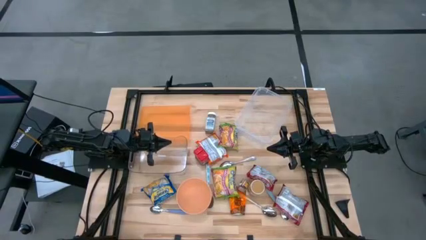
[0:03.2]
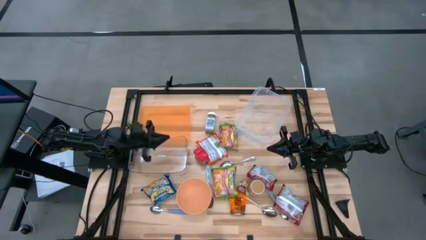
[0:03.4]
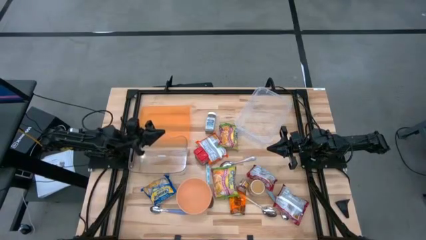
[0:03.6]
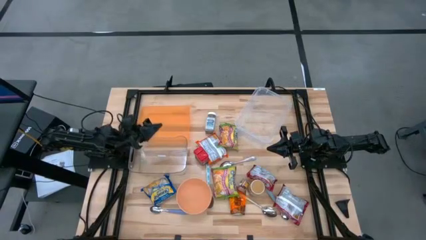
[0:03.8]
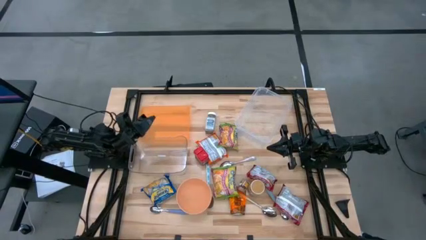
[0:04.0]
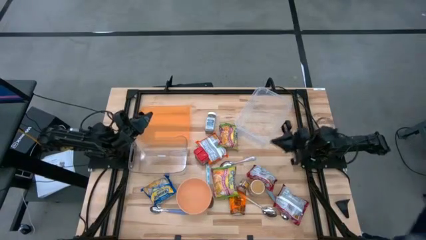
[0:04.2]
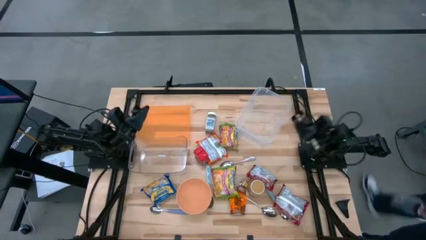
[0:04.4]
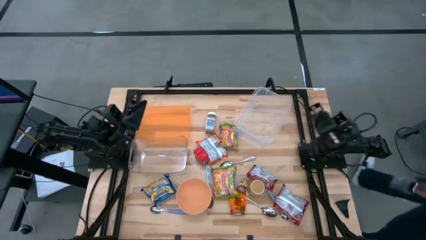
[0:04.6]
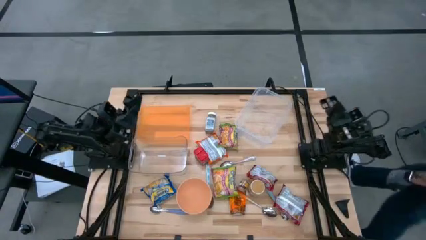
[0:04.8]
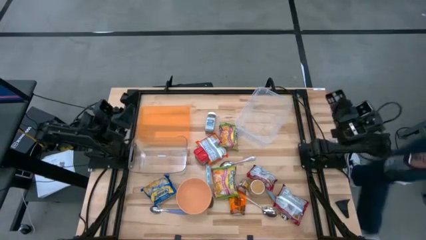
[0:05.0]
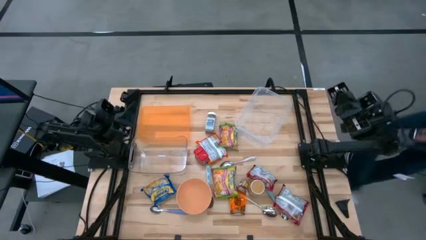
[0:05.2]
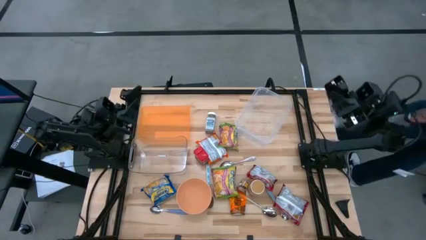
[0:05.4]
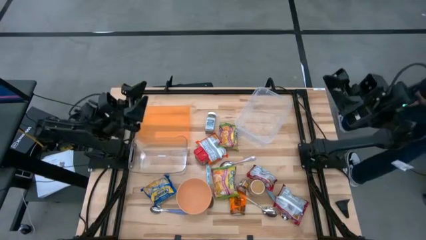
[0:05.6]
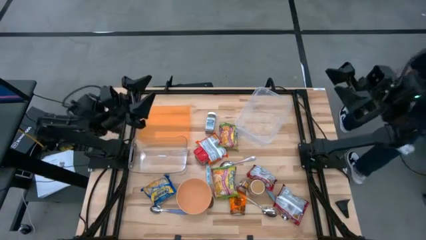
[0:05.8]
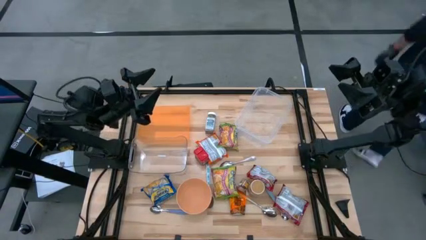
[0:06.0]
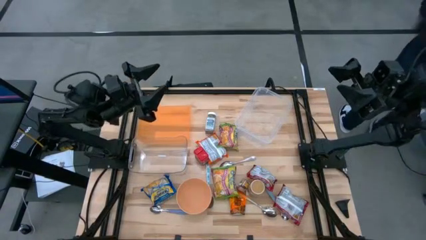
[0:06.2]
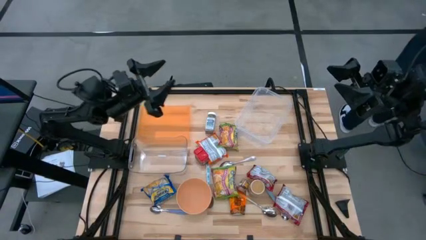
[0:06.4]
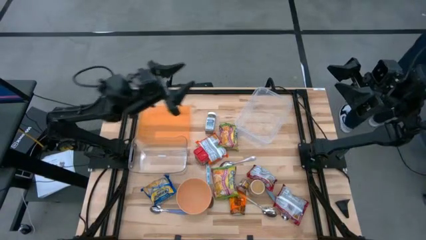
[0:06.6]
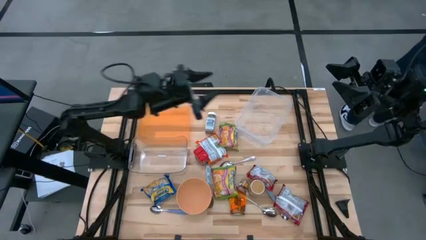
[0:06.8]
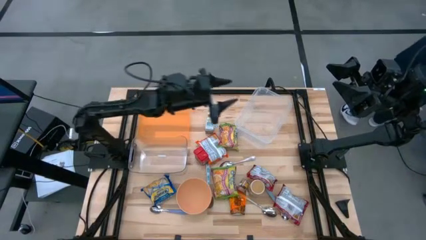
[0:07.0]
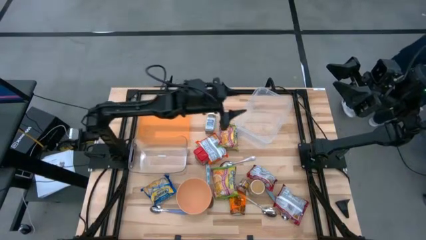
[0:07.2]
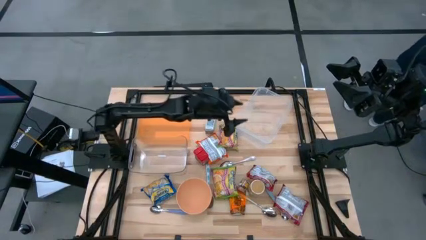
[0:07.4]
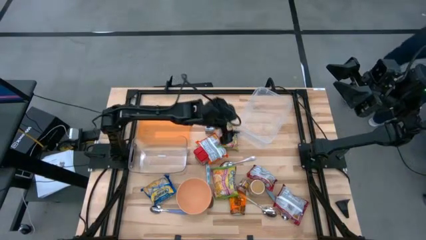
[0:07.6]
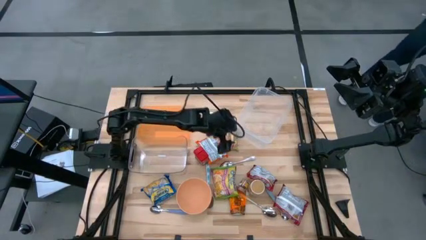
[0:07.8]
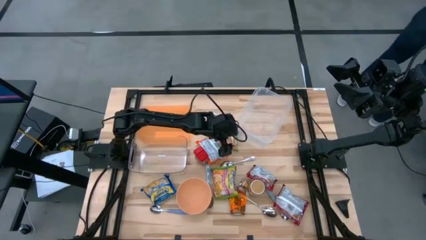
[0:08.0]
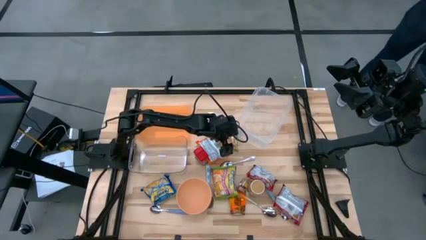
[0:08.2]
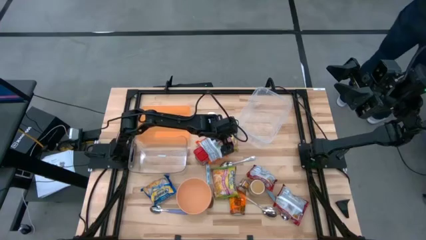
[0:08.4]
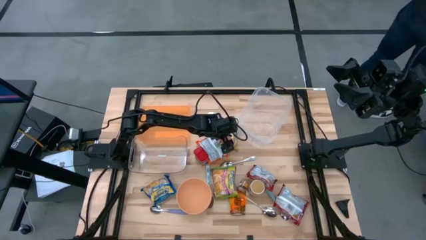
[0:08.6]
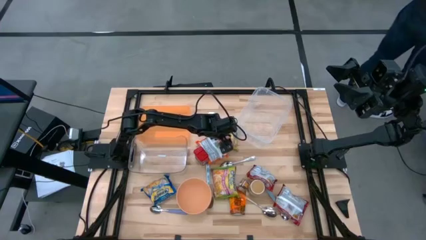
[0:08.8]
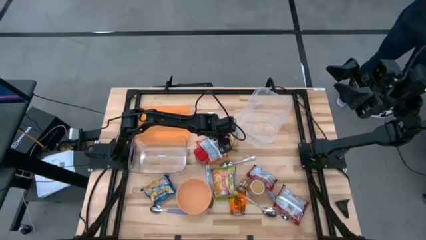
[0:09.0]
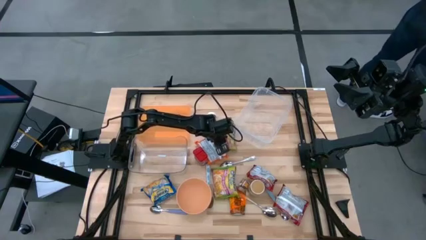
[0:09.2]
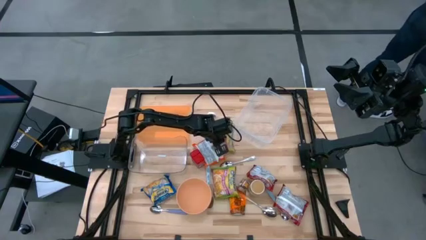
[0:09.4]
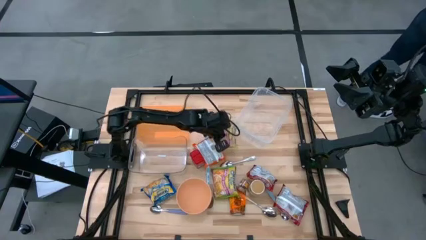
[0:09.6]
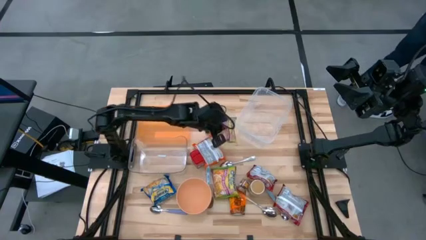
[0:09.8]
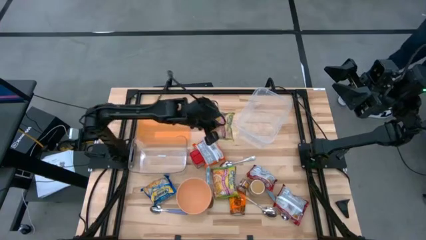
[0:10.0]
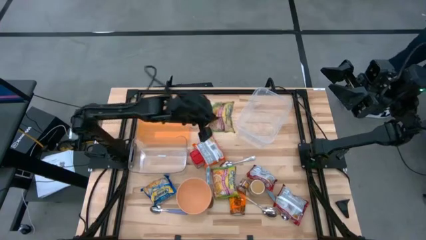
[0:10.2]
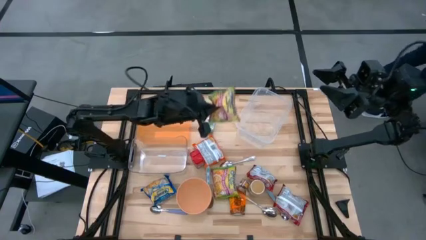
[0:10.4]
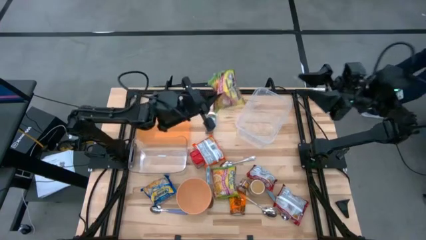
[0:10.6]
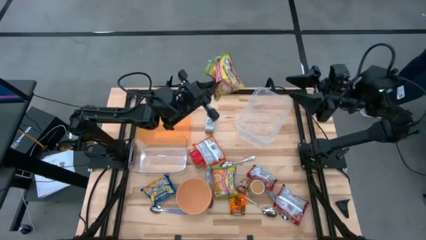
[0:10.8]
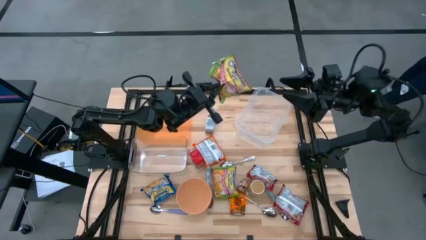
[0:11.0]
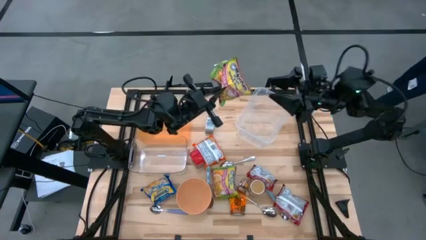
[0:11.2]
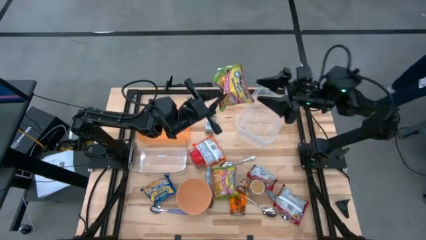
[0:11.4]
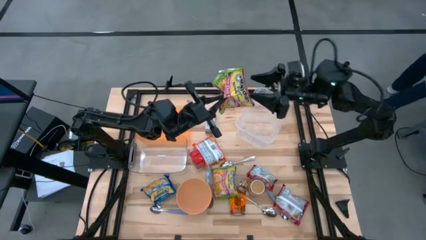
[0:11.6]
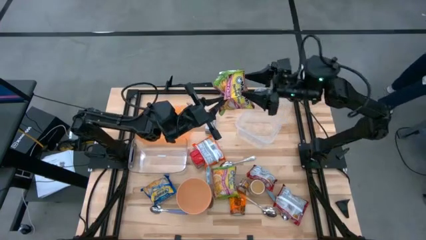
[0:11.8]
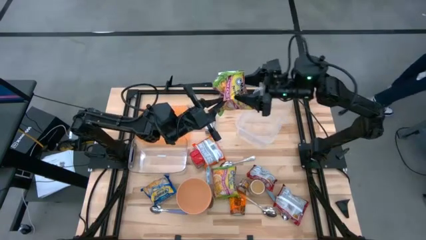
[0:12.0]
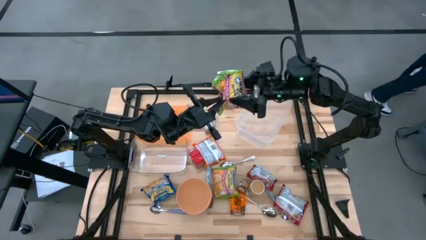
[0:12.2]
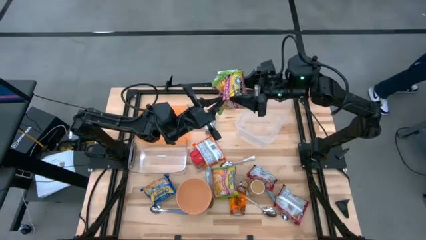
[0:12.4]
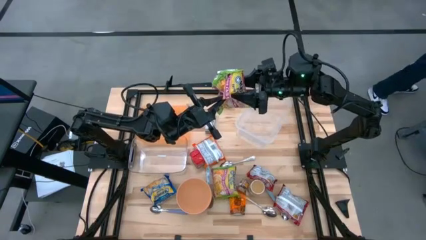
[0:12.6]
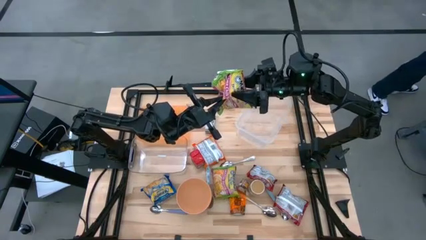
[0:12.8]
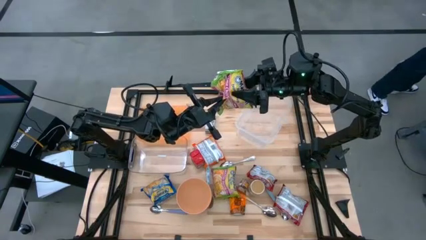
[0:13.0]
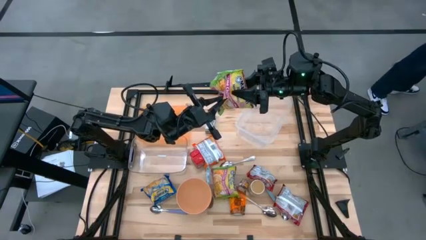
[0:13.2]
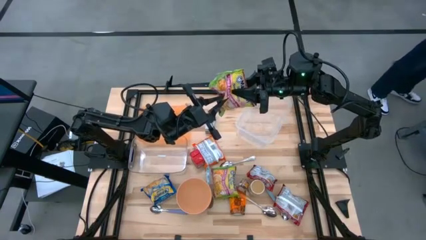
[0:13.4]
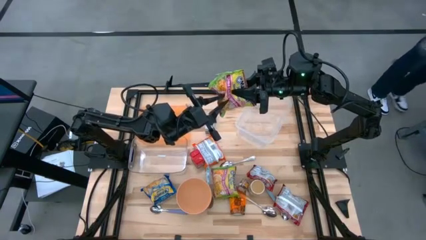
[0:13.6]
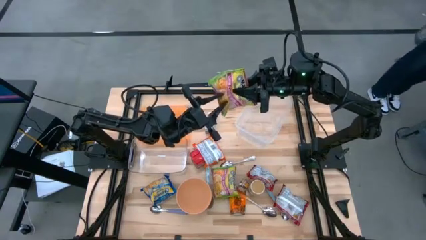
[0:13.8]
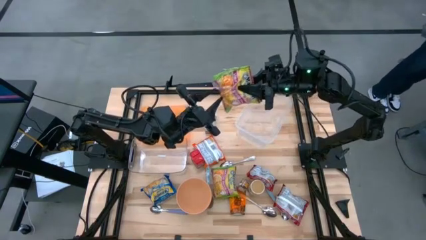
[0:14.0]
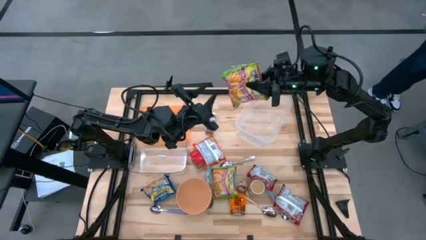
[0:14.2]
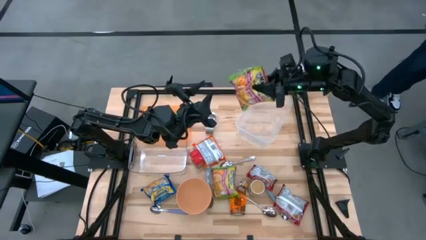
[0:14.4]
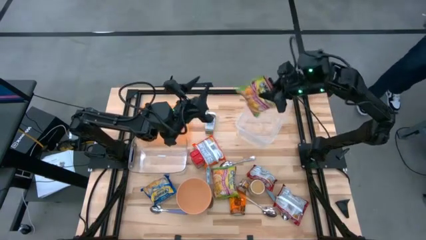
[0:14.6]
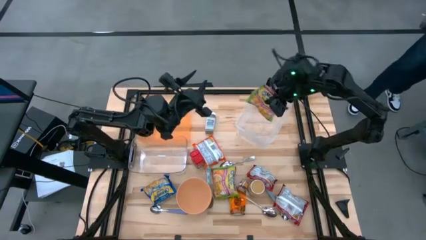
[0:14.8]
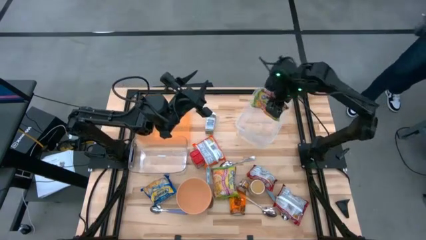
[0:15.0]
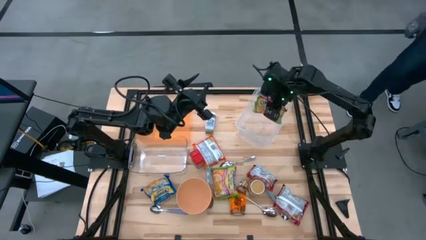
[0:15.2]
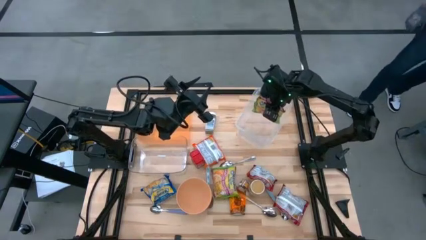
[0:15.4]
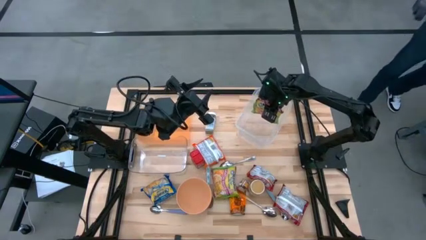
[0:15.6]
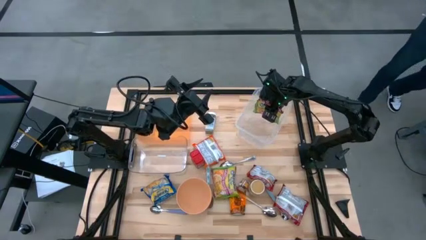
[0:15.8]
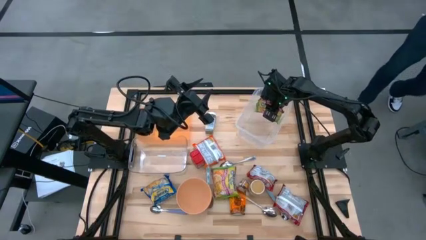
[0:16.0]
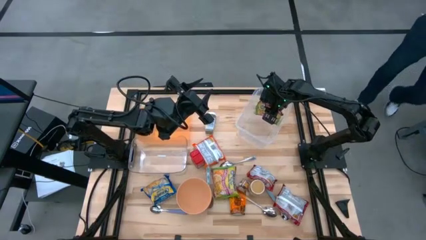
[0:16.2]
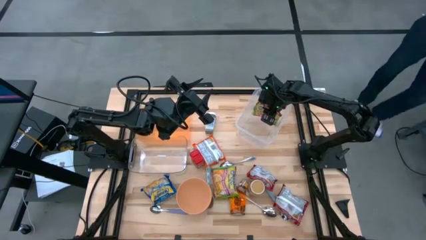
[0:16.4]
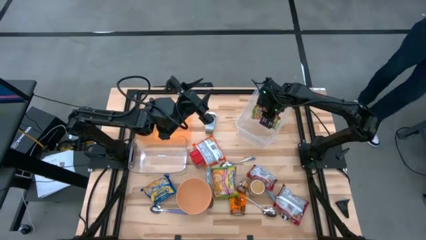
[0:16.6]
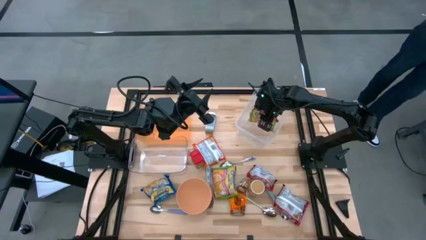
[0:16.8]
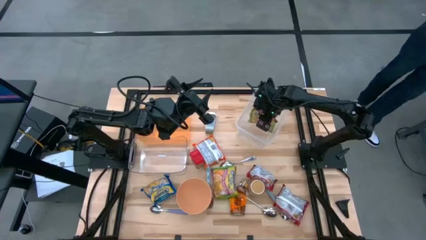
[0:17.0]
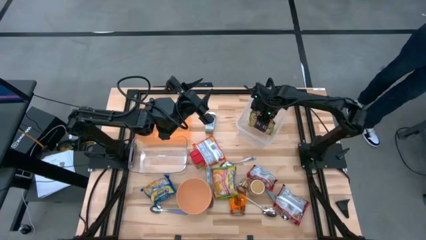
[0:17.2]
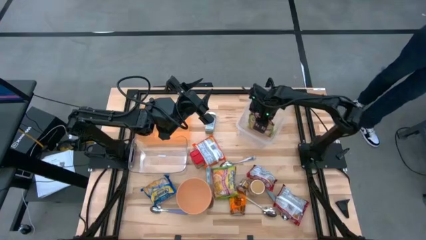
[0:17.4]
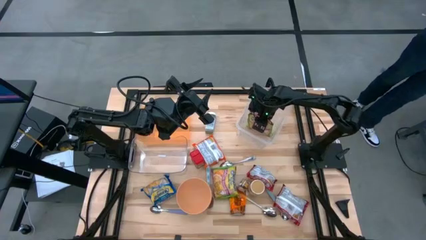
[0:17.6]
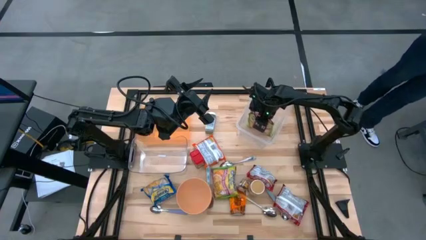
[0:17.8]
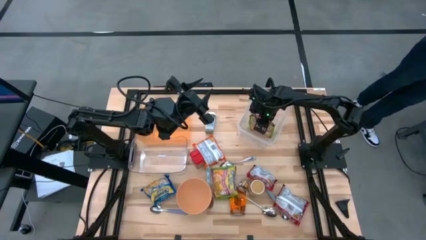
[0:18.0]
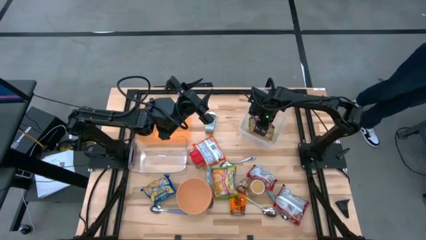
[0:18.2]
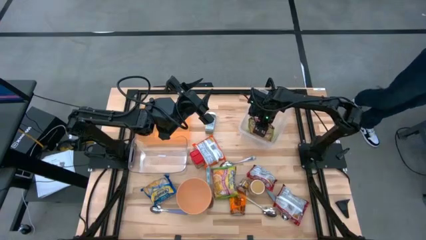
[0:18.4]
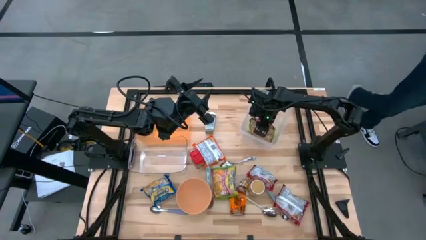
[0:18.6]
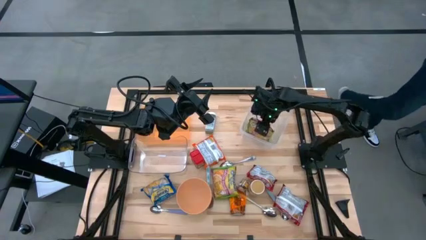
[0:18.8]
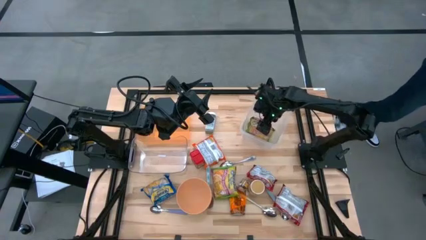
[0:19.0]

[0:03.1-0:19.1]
Task: Pick & Place Food Item
Put the top green noodle pack into the top transparent bin
